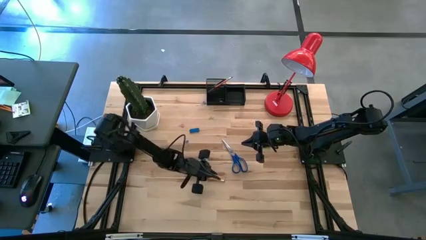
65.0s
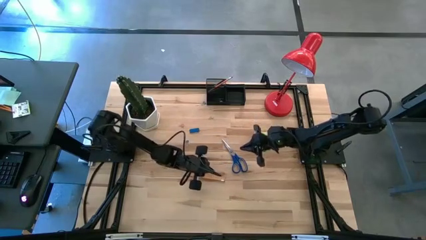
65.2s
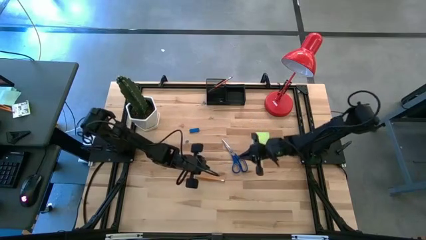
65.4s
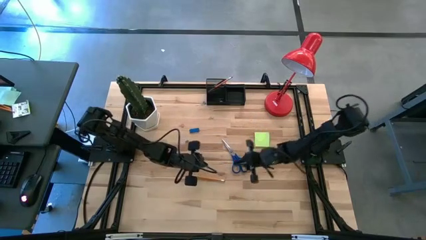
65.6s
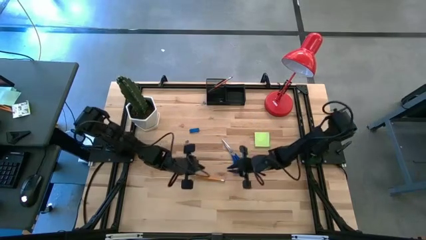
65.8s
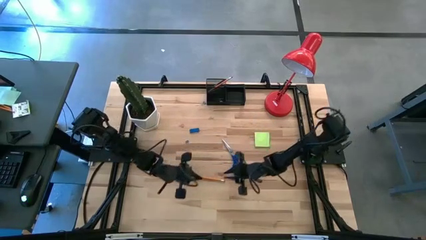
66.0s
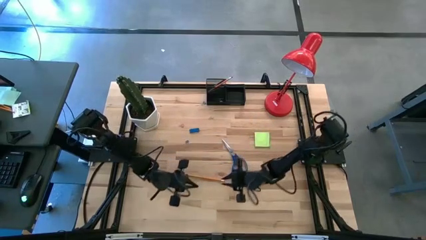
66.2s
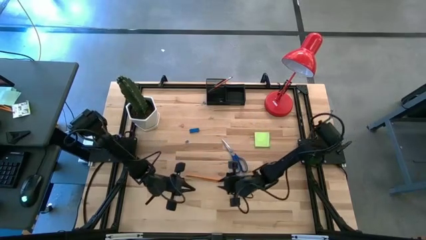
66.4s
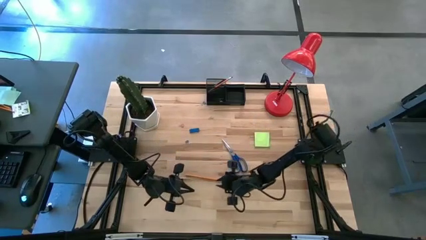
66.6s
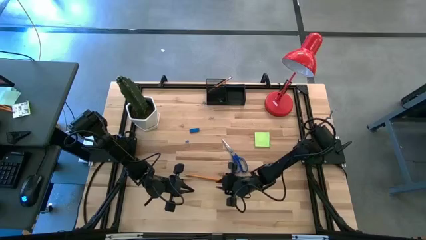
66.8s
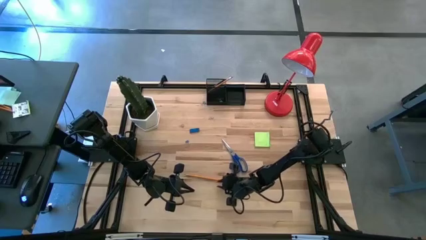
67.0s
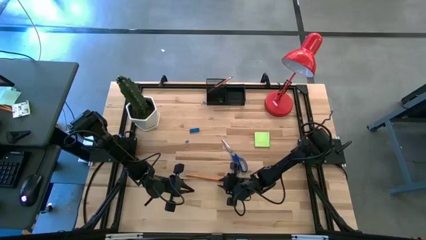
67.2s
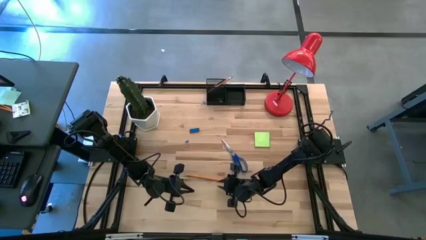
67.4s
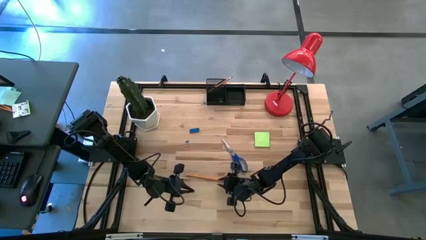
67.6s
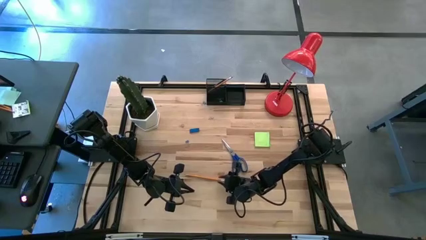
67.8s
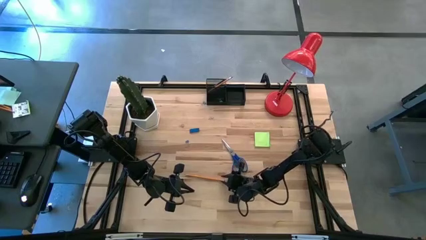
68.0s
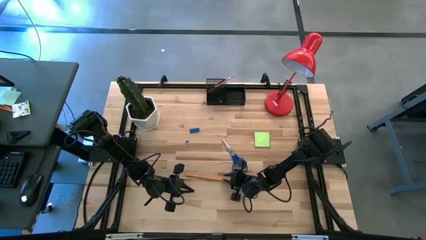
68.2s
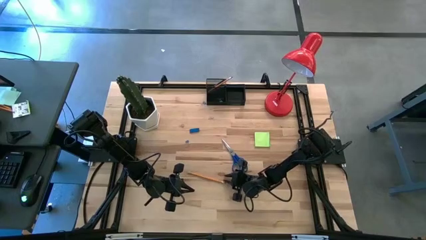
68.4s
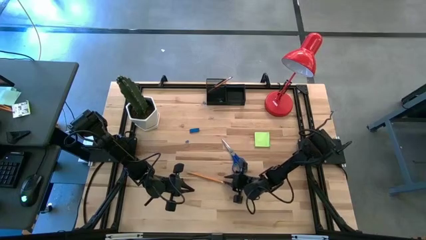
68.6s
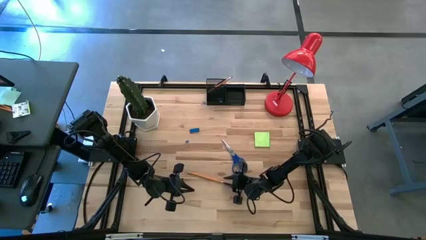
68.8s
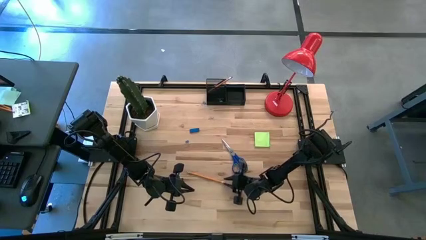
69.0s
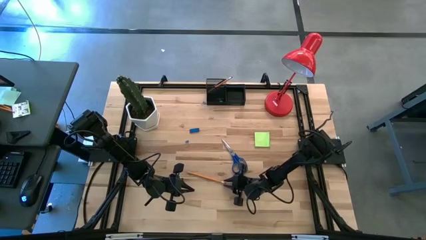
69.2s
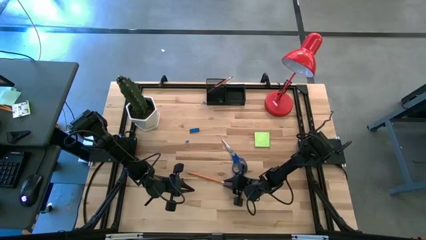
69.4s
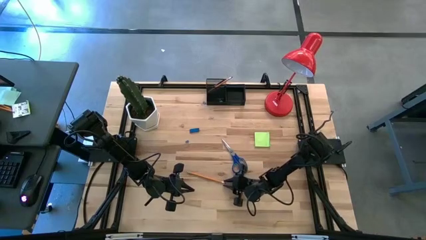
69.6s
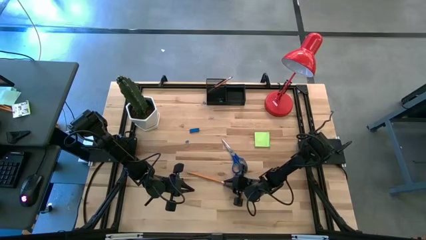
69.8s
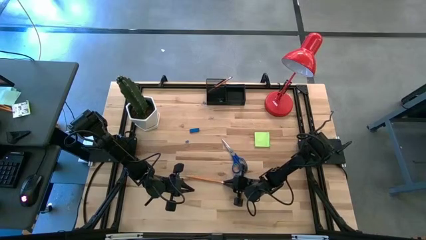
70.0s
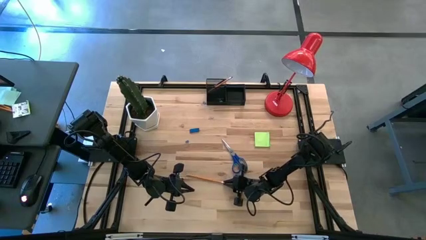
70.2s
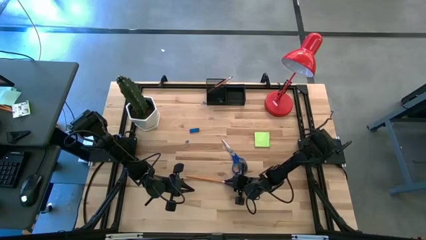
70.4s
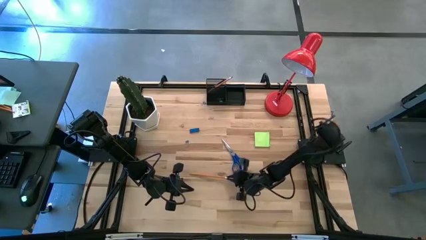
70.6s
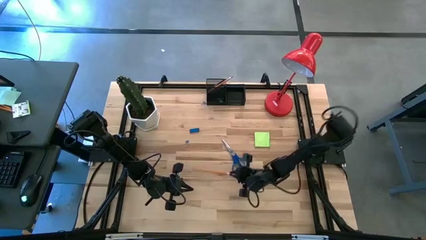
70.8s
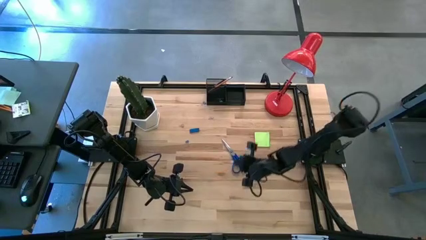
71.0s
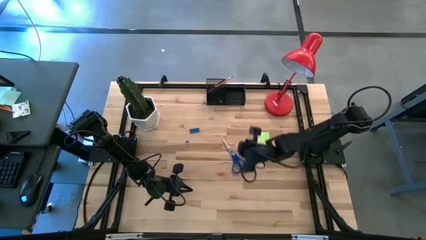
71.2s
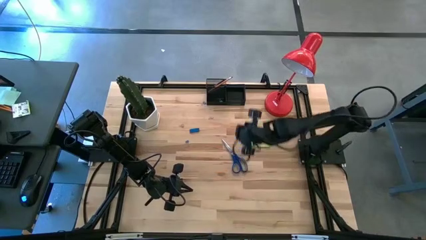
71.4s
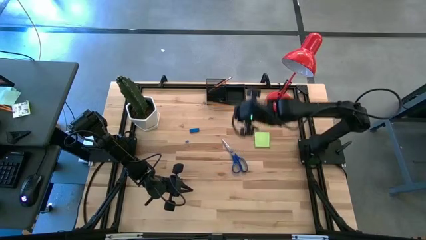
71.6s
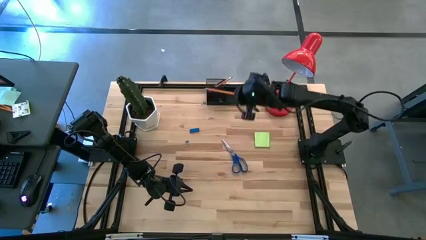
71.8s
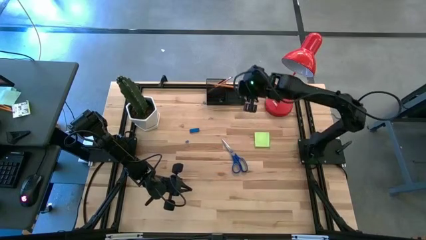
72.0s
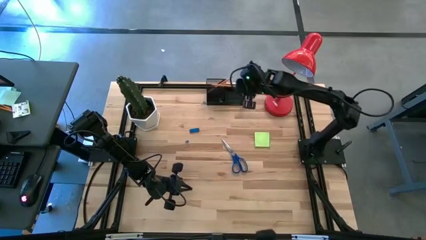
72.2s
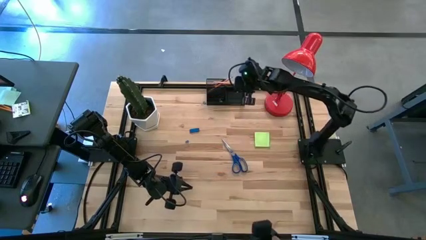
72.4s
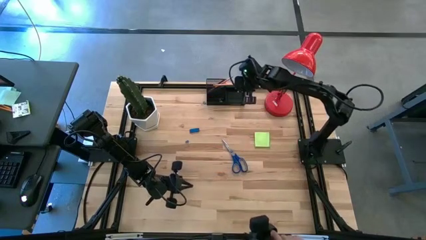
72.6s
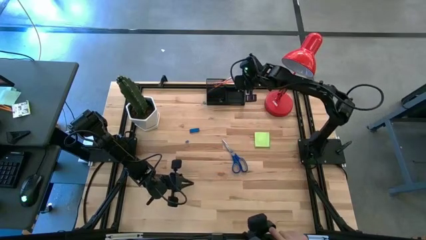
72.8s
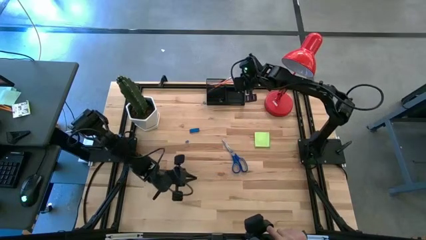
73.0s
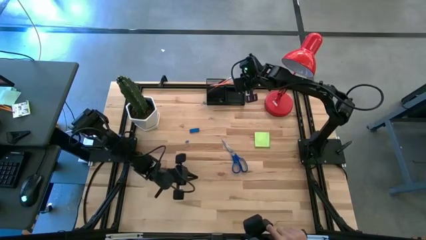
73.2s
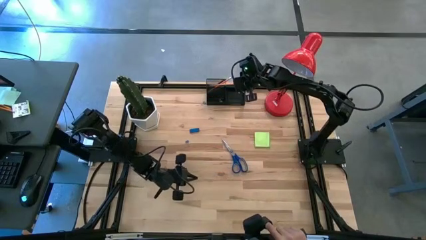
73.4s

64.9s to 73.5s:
Task: Pick and place office supplies into organizer
Put the yellow pencil into the top left section of the desk organizer

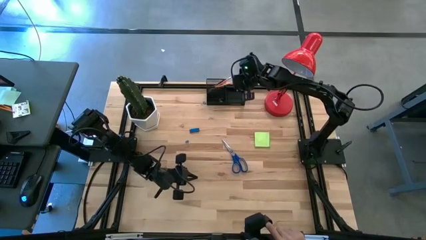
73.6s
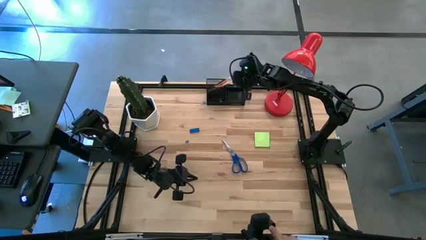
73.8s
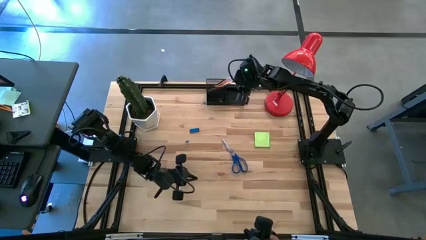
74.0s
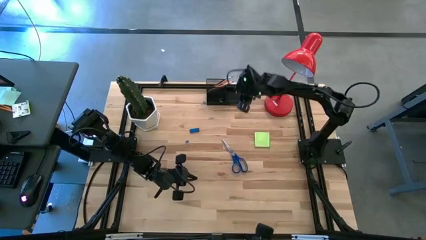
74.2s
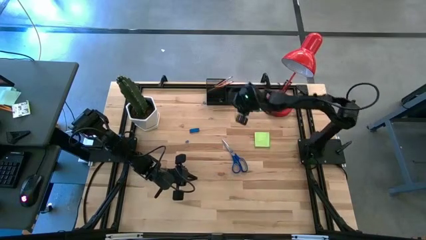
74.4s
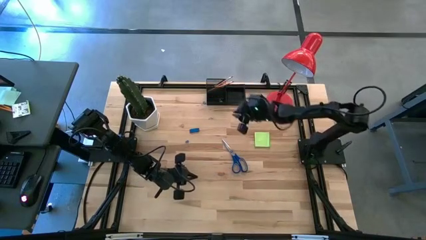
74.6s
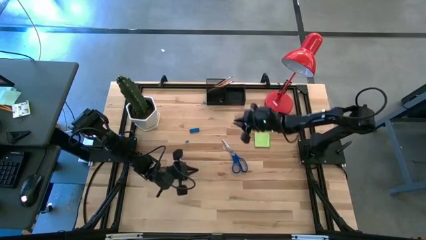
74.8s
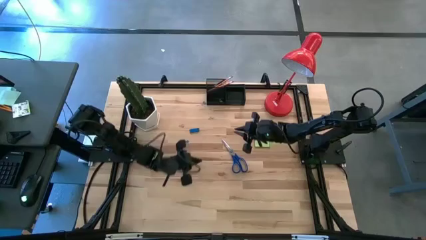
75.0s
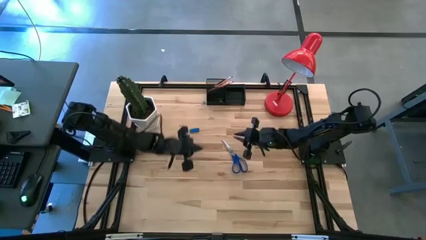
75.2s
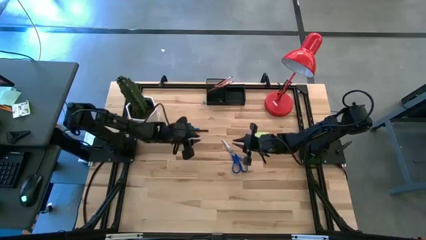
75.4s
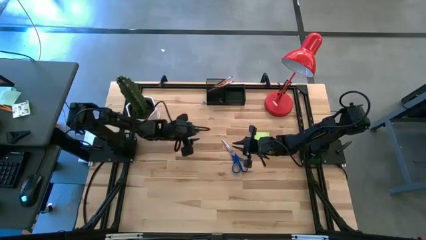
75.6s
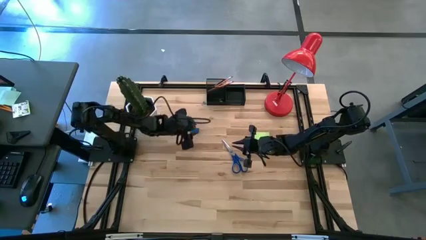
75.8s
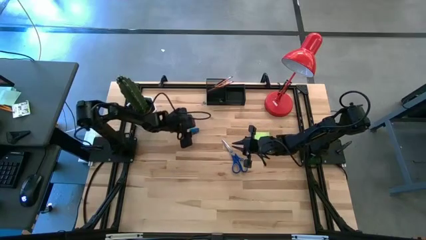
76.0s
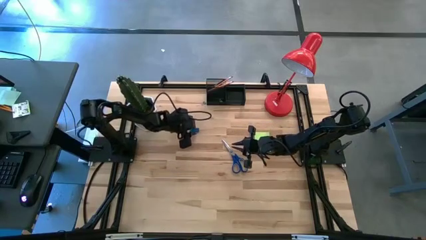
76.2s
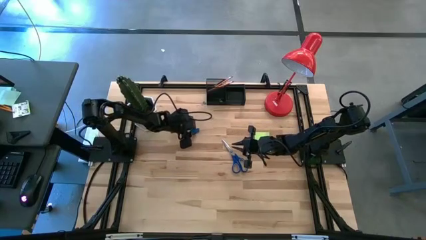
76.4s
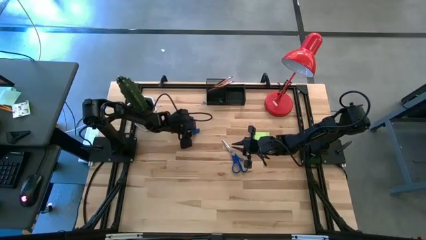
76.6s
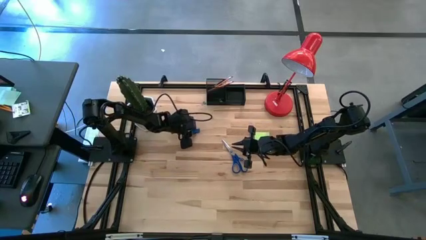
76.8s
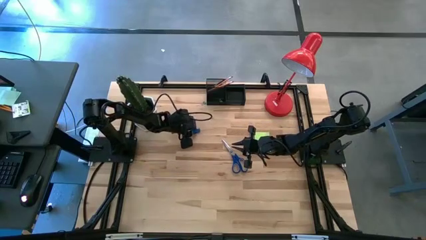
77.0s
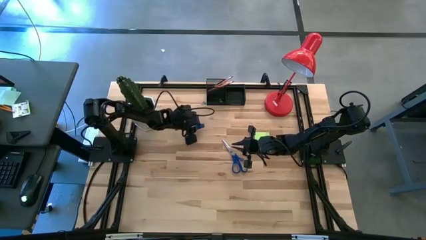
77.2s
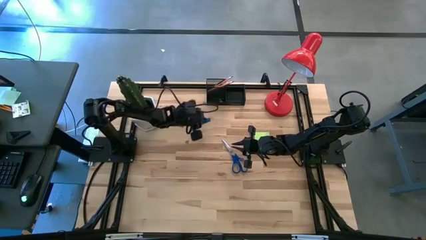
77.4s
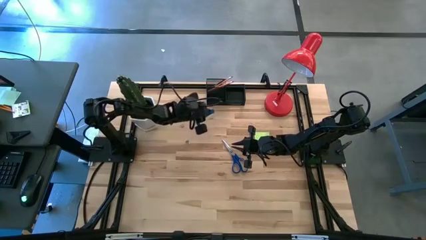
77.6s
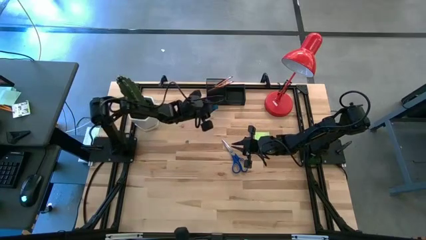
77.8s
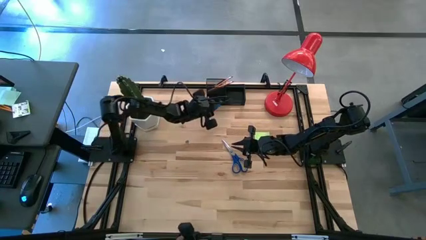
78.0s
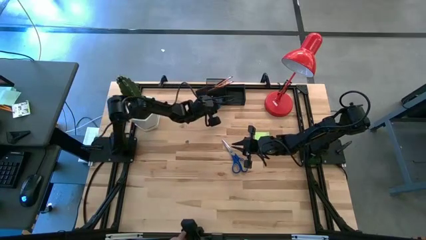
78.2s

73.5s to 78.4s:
Put the blue eraser into the bottom left section of the desk organizer
